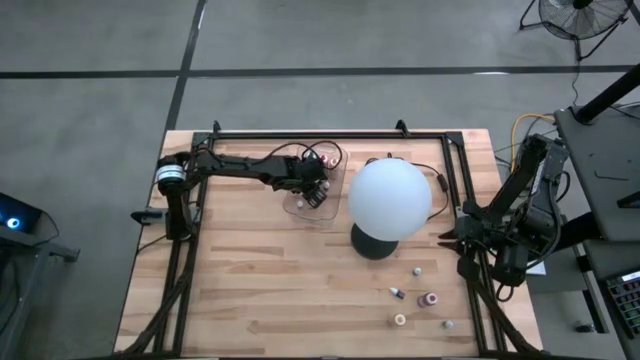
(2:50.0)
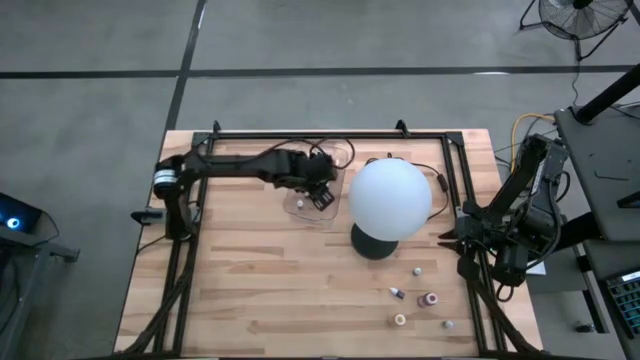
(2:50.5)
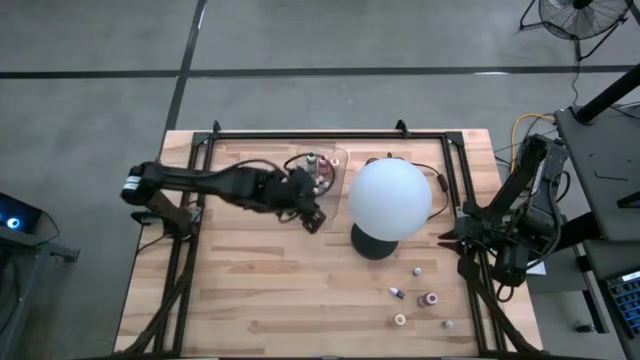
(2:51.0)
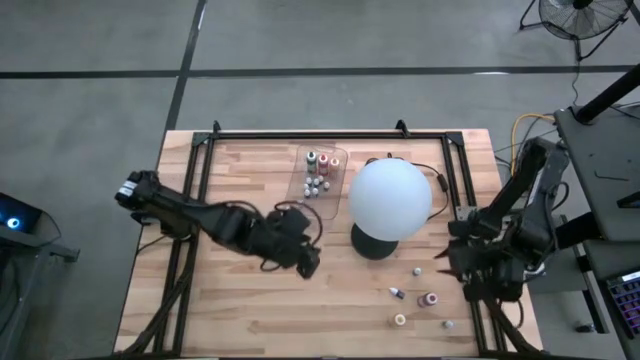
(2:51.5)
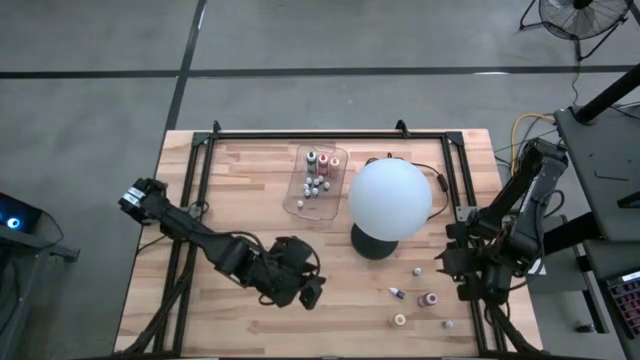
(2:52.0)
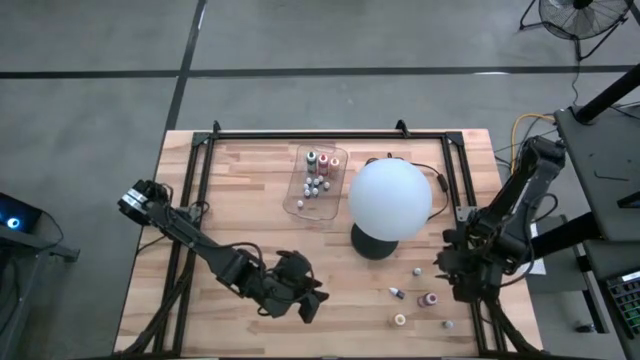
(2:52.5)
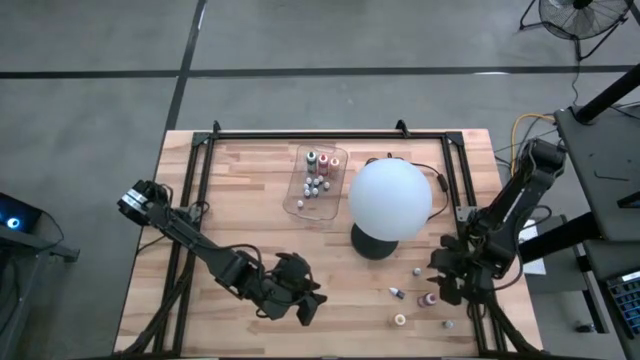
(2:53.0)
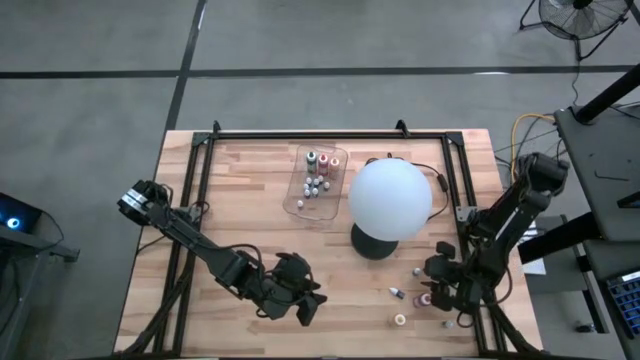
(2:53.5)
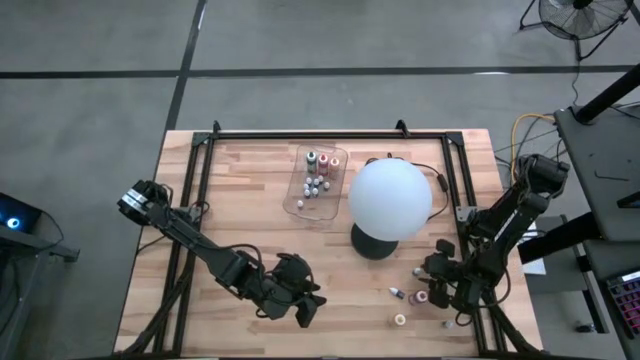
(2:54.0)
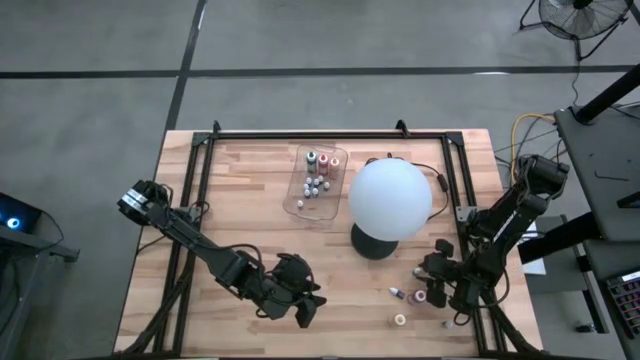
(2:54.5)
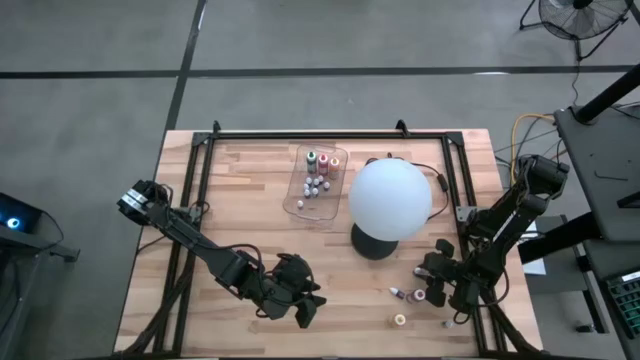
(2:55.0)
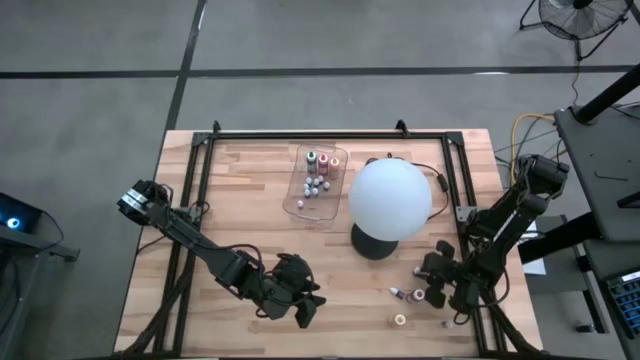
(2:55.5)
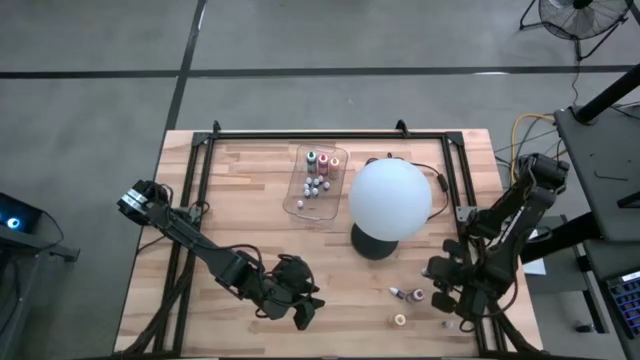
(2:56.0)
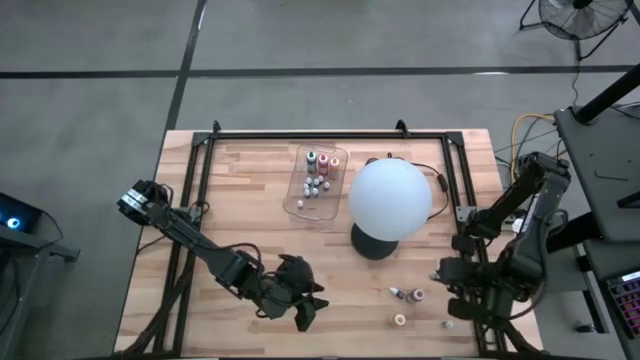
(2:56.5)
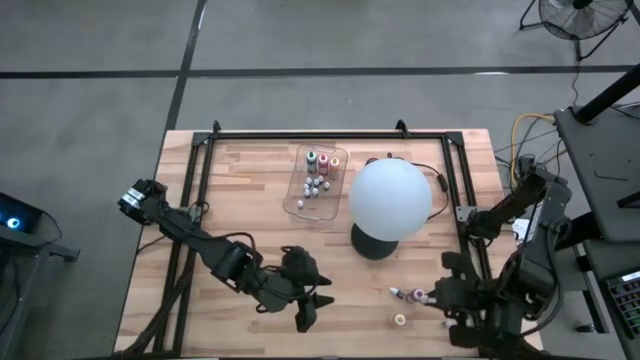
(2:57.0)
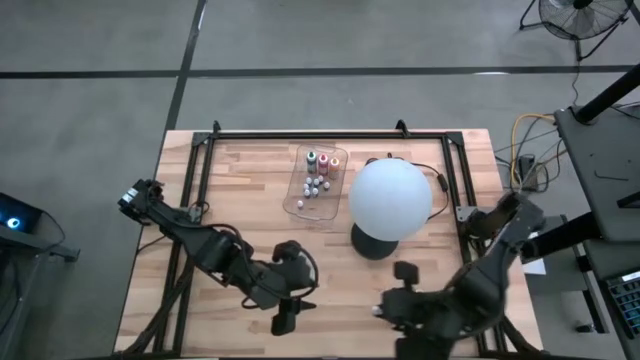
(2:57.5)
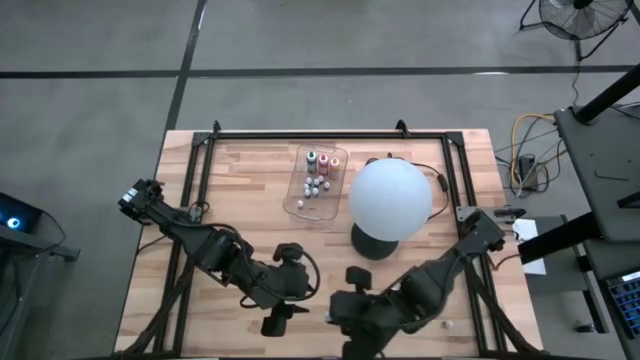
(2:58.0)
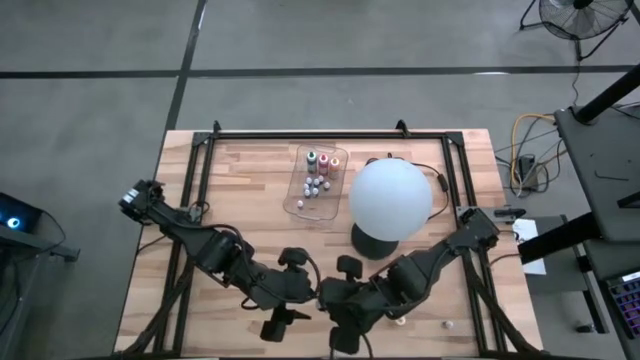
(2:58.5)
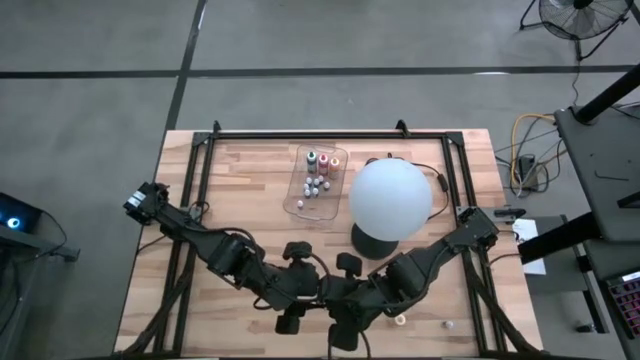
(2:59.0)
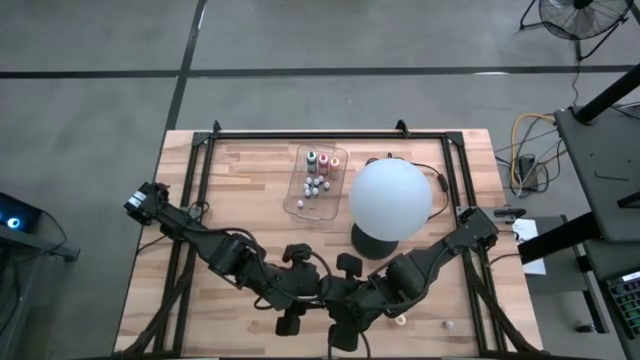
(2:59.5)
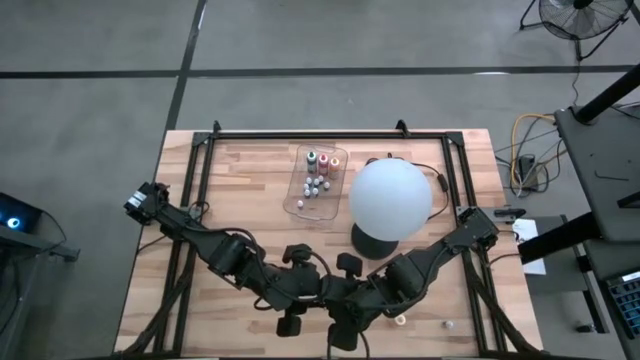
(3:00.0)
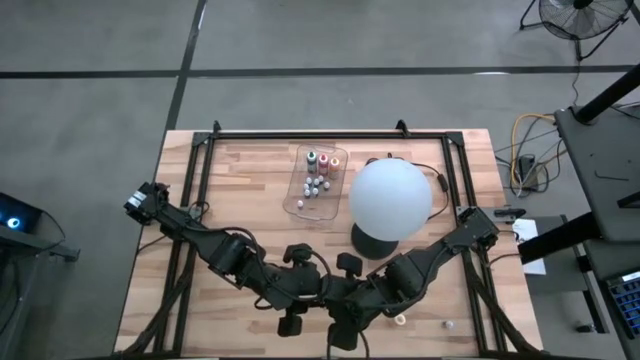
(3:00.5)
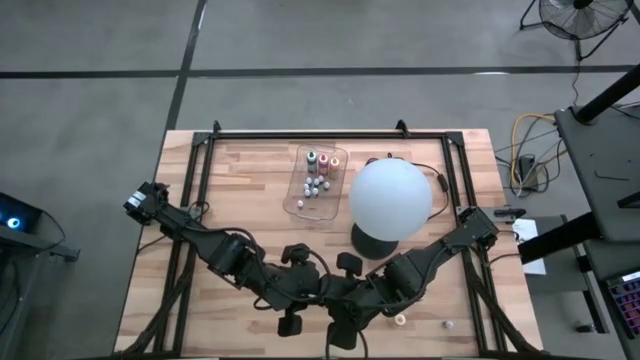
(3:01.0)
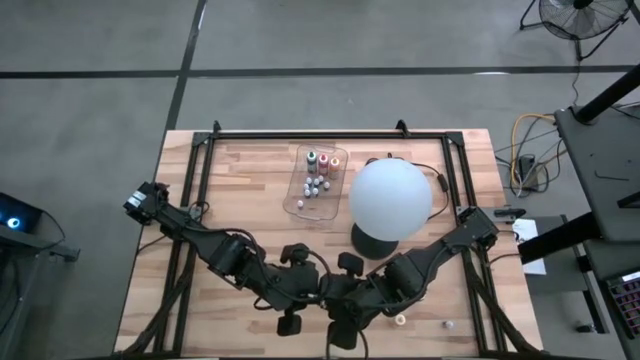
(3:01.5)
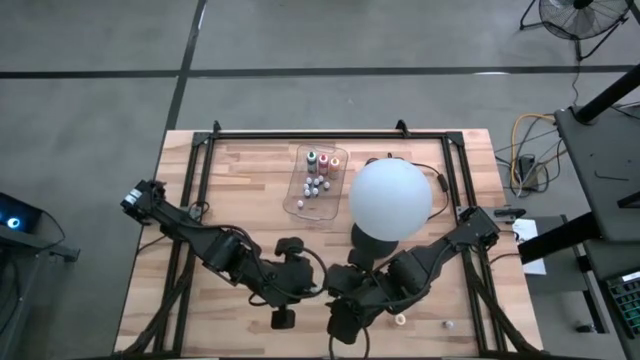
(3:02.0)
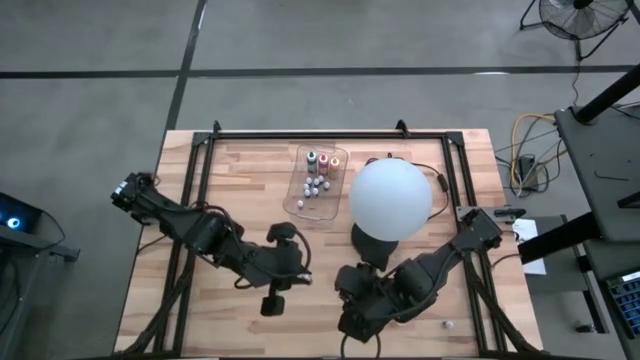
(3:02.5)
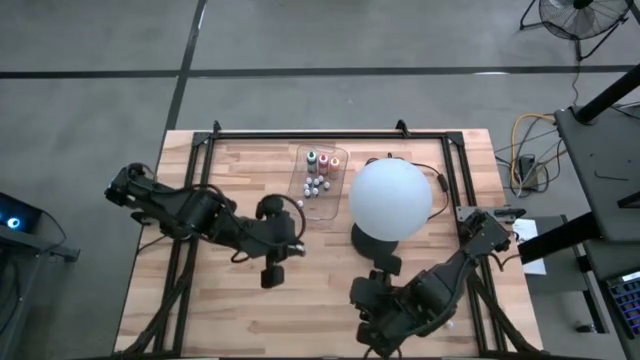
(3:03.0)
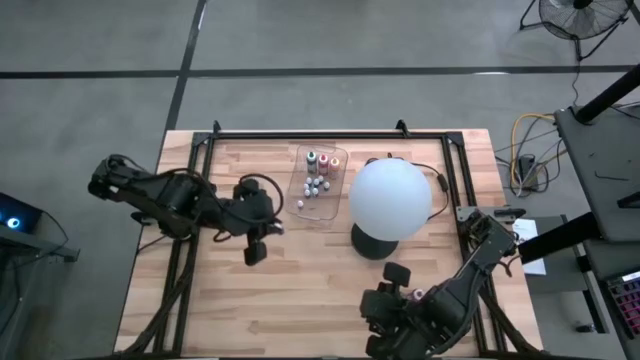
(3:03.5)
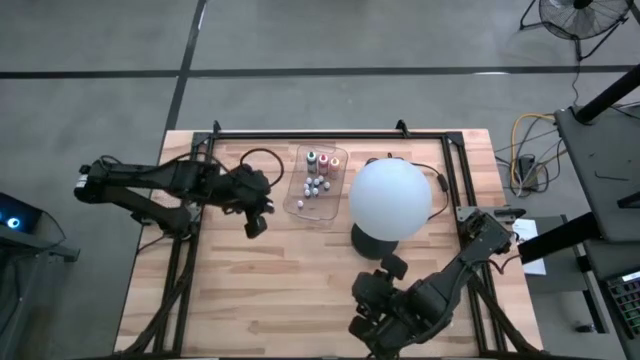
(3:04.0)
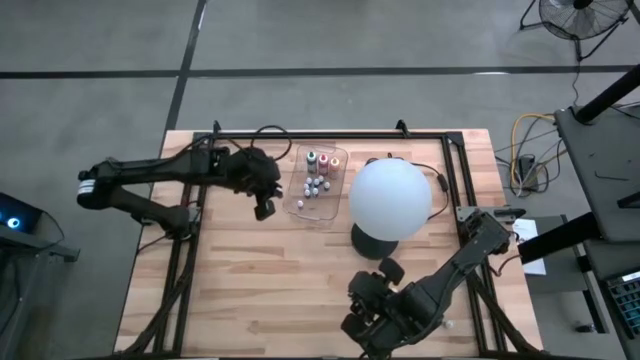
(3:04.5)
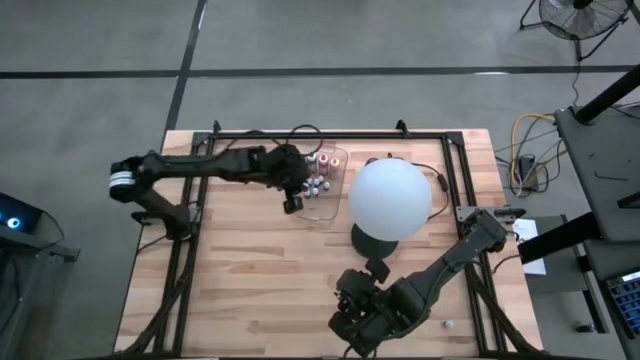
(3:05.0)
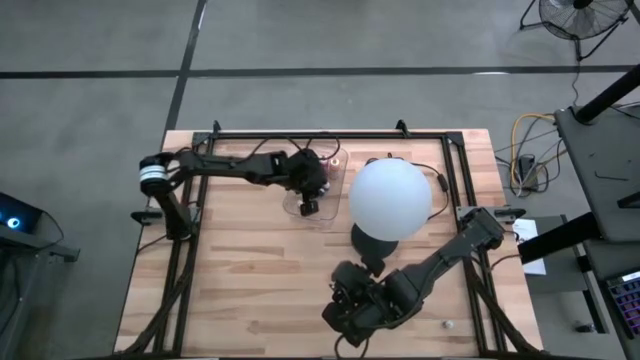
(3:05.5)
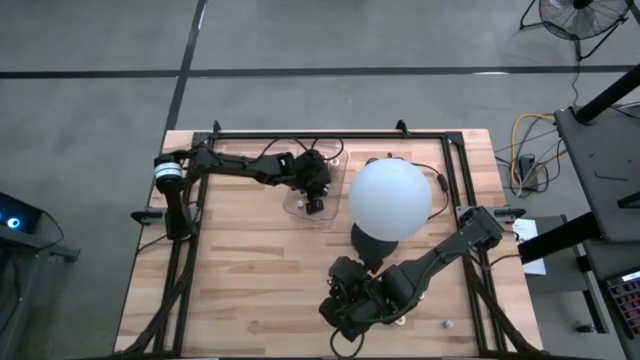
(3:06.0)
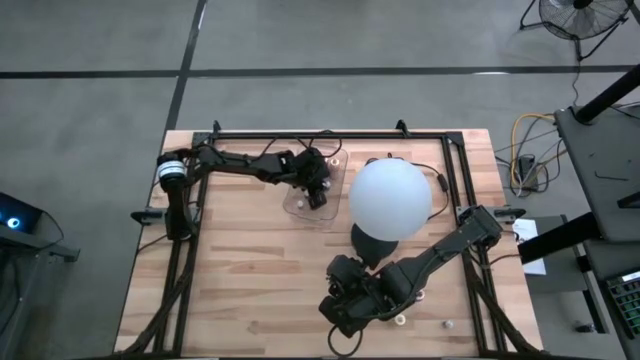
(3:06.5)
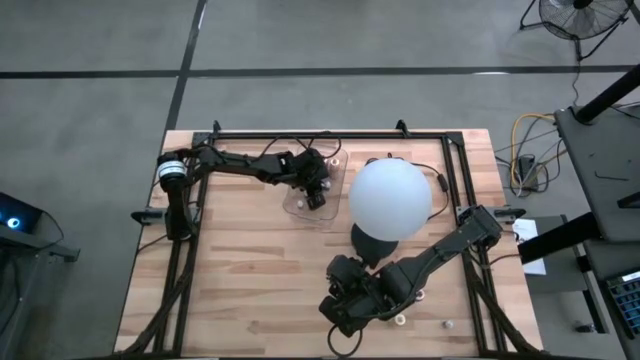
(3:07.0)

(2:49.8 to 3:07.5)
Task: Pick & Place food coloring
Put the small black food coloring bottle into the transparent bin

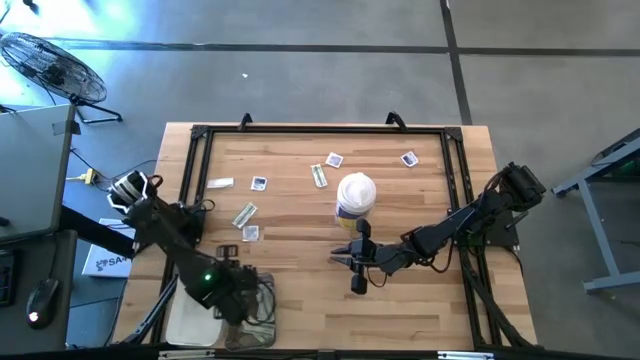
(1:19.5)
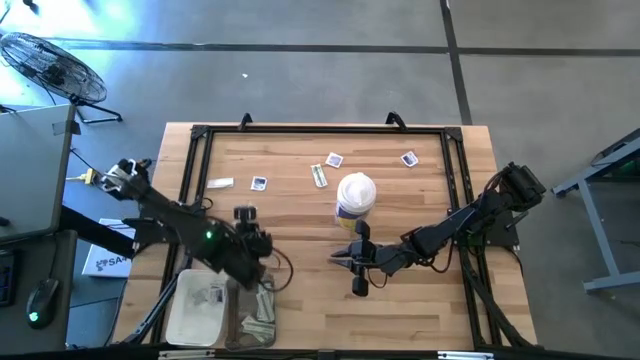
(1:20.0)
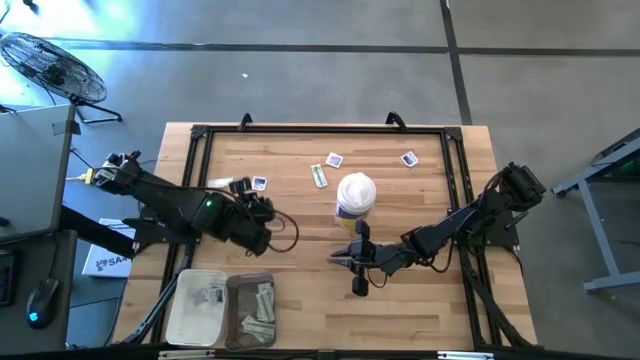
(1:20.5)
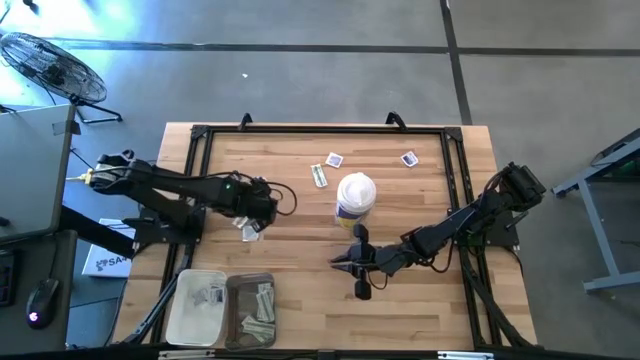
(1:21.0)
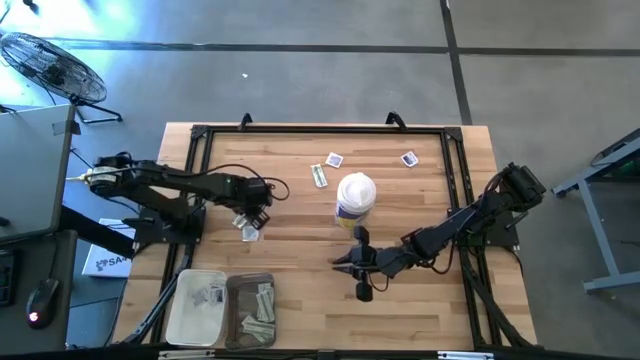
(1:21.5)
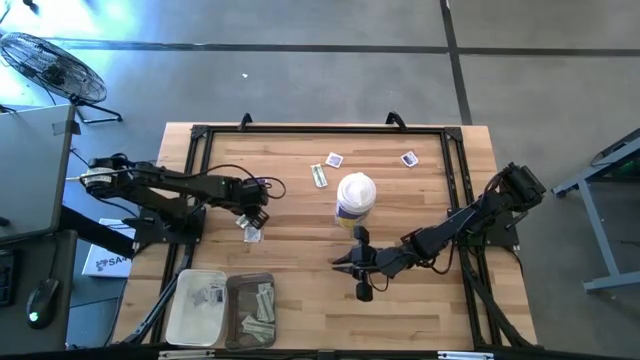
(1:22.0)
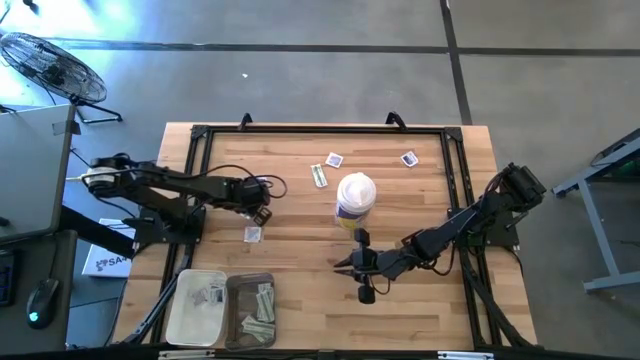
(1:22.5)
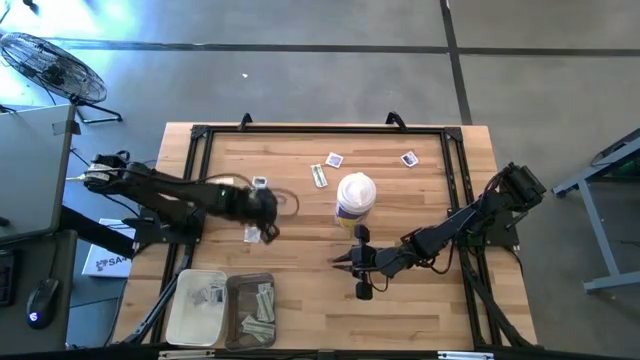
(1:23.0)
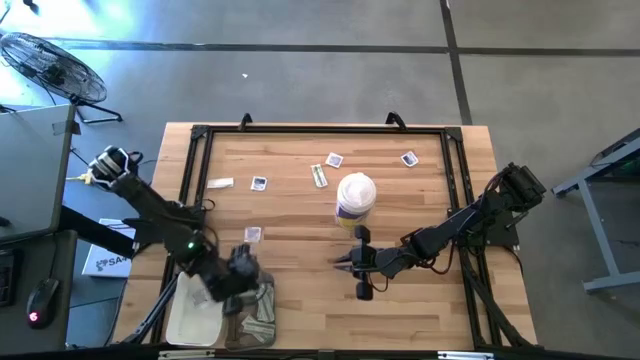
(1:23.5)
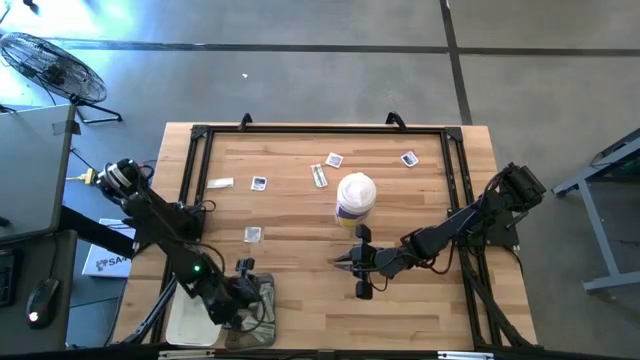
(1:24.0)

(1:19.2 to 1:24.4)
Task: Pick & Place First Aid Supplies
Put the bandage into the black transparent bin
